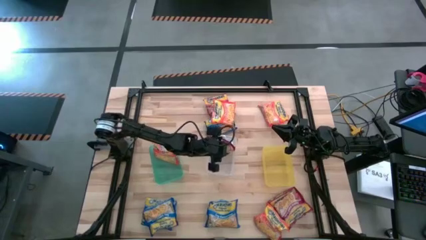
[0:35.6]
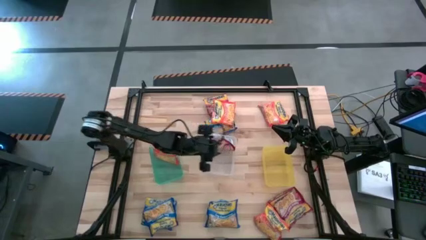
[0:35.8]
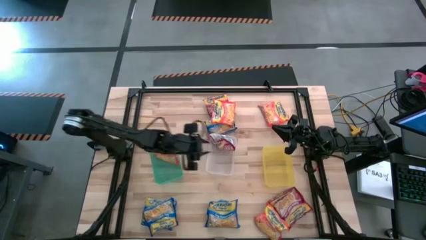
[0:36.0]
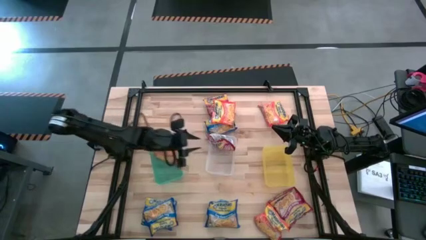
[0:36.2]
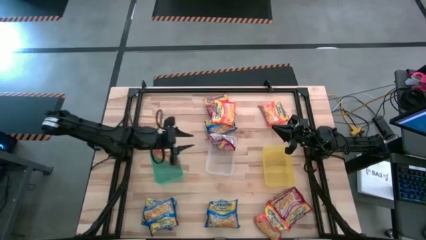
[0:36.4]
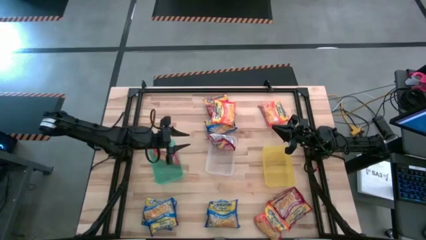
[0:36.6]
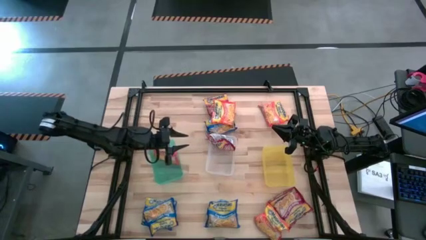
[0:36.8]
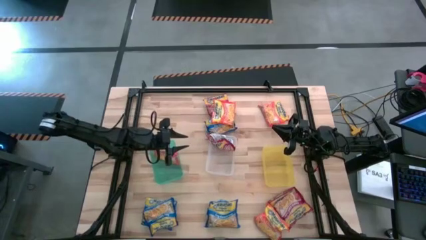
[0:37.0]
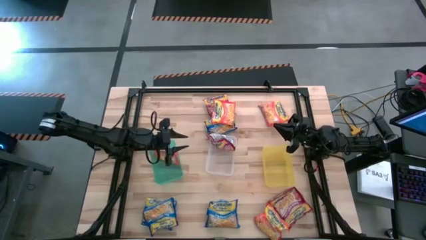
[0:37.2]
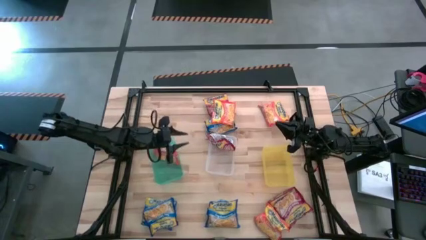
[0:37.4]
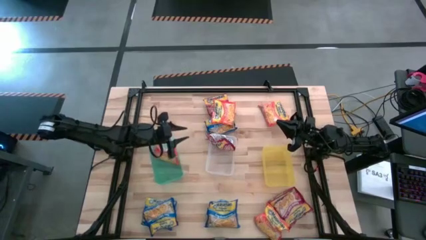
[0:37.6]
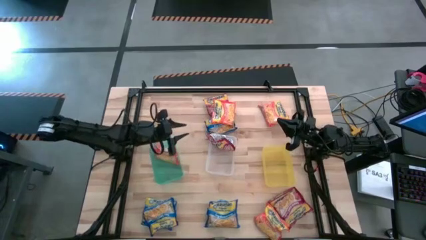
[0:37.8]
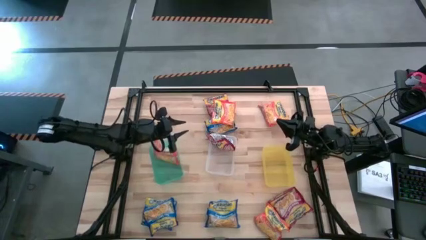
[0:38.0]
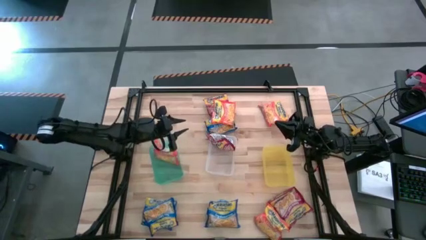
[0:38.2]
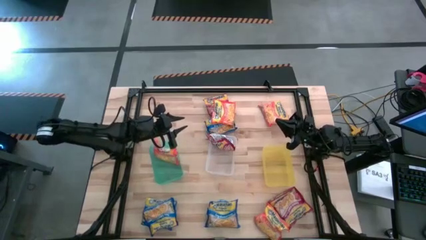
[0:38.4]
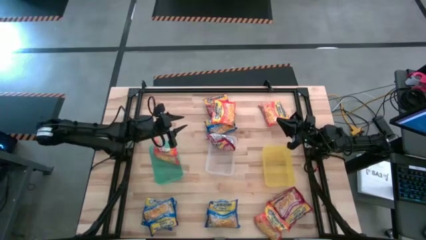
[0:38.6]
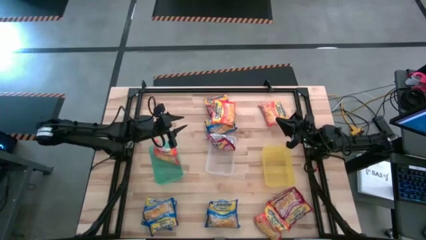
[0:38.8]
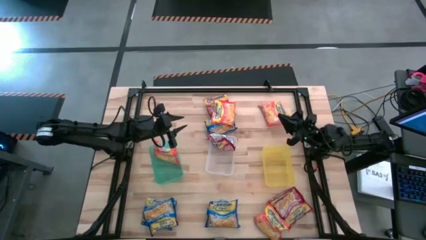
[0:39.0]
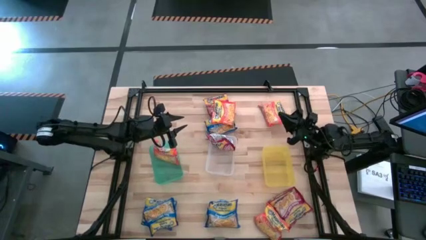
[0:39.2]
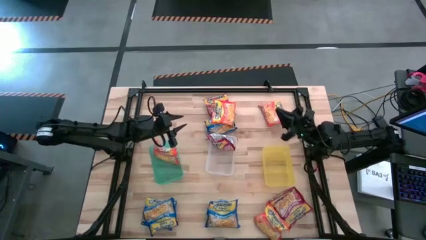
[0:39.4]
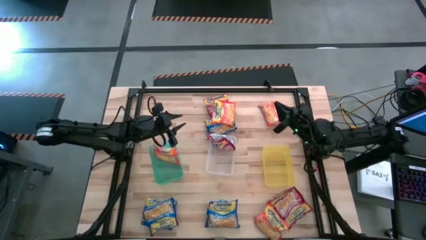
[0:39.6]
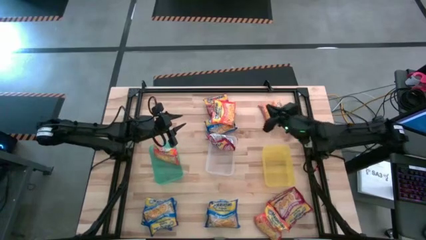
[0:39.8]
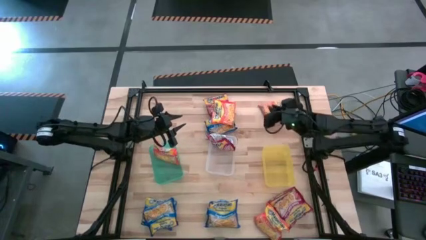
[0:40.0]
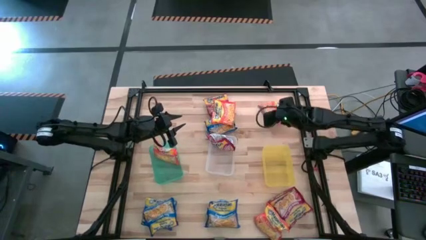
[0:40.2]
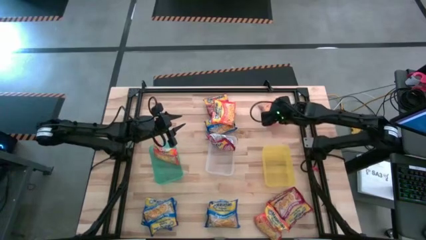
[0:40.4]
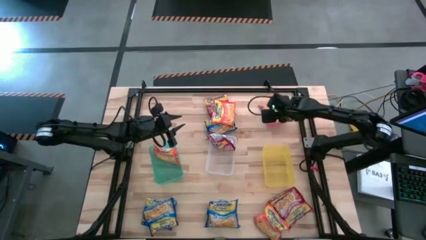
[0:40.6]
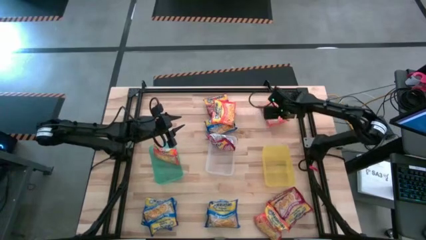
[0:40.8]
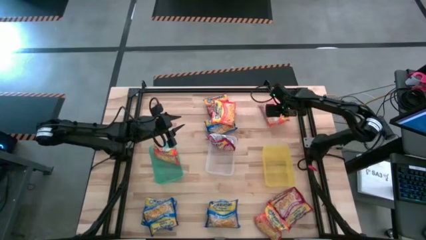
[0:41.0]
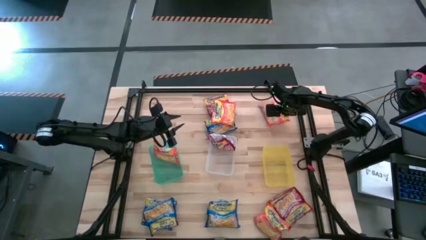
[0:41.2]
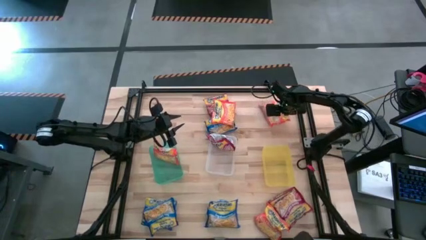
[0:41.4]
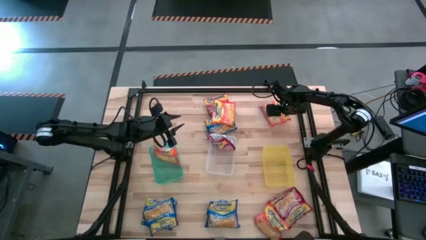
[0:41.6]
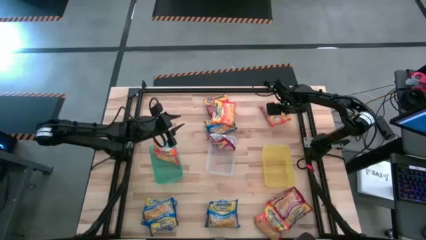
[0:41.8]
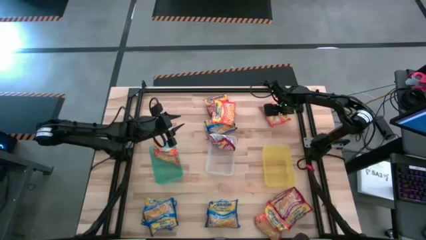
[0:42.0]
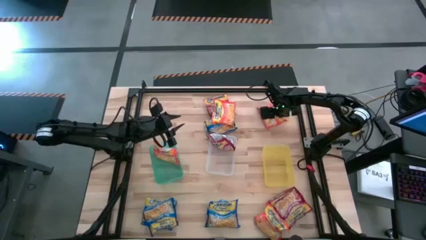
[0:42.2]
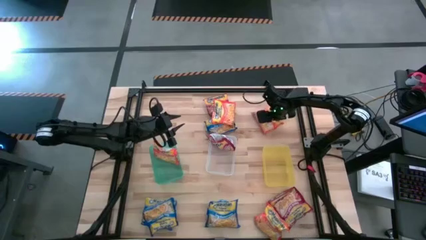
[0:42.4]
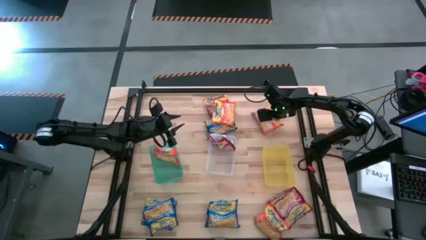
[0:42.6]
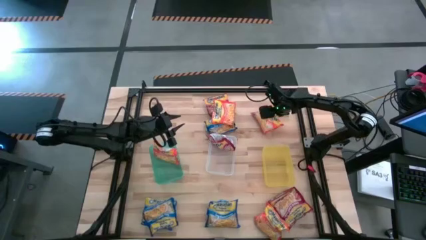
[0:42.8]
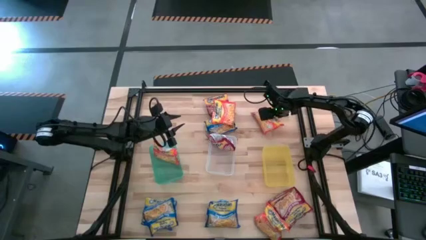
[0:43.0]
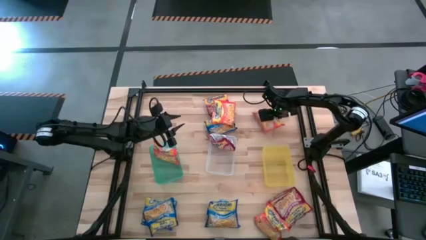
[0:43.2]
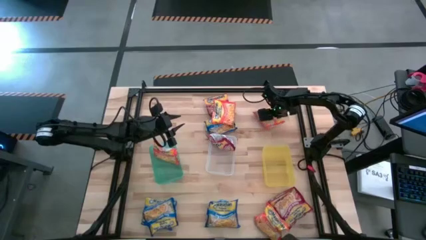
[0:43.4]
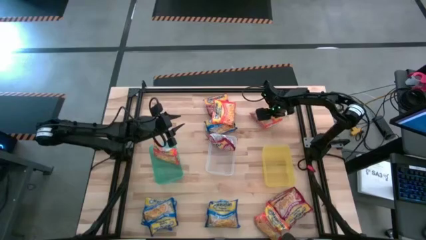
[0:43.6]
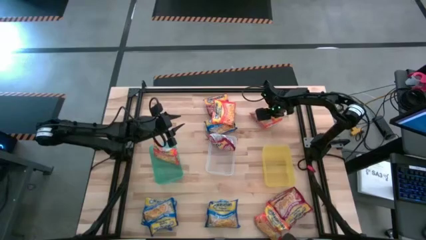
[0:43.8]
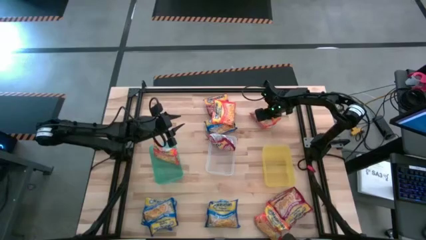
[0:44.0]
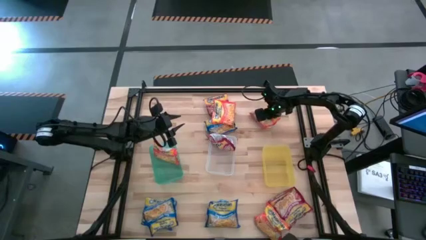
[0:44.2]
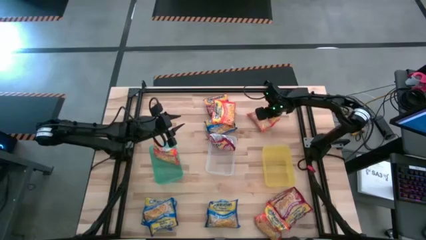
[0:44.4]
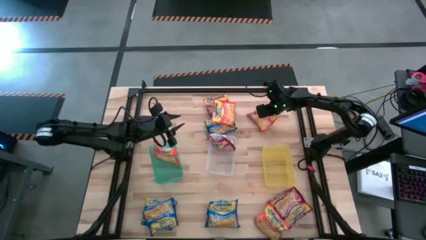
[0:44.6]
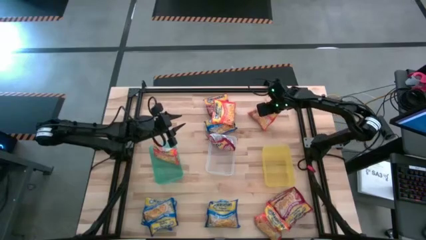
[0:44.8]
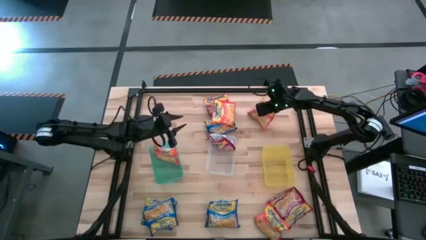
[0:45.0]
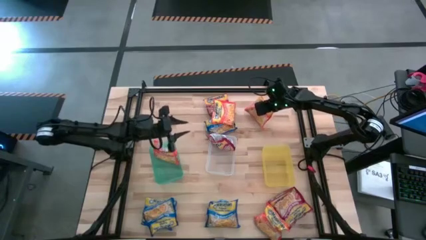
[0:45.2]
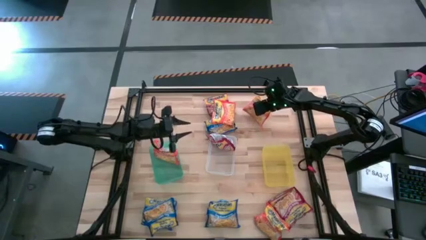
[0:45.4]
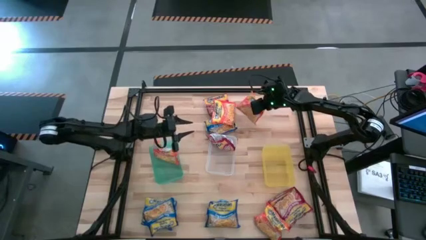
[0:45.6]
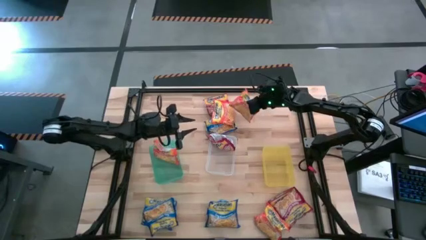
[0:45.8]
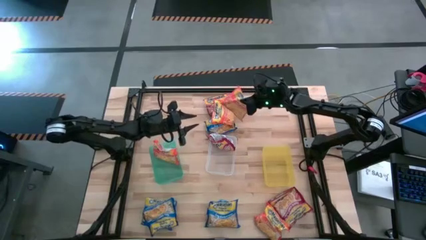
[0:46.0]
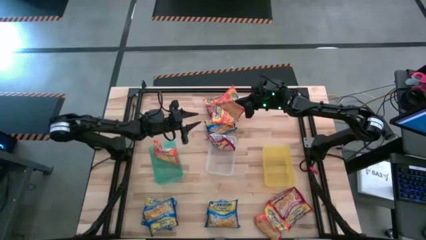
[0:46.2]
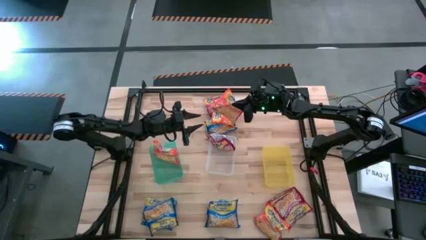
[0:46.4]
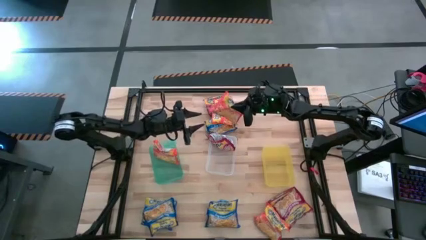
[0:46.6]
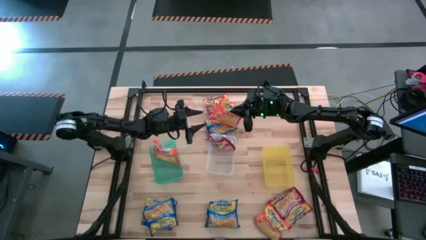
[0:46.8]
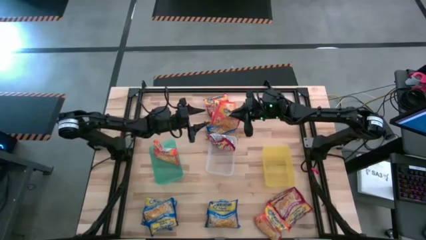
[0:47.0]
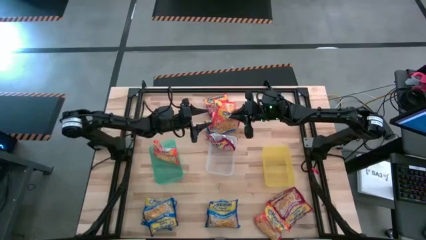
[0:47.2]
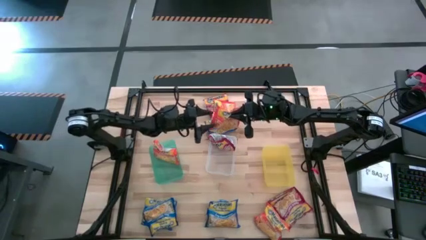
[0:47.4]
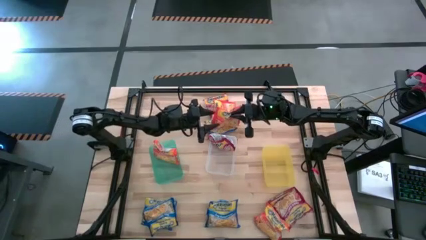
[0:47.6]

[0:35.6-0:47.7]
Task: Sort Maruchan noodles
Put the orange noodle pack into the green bin

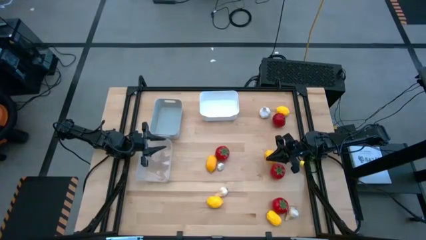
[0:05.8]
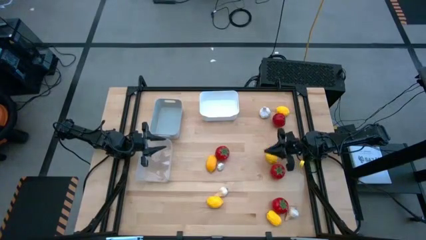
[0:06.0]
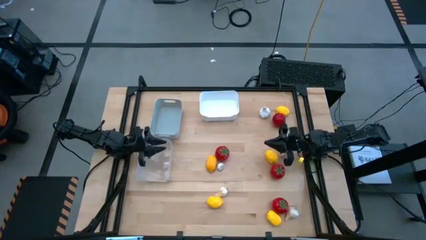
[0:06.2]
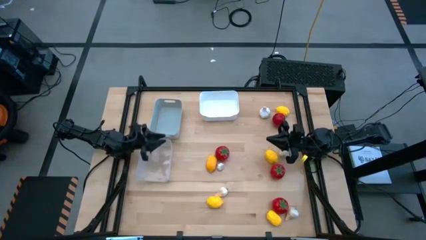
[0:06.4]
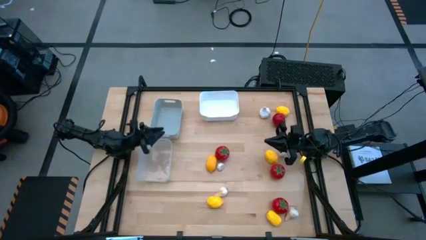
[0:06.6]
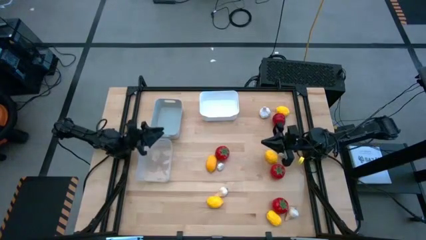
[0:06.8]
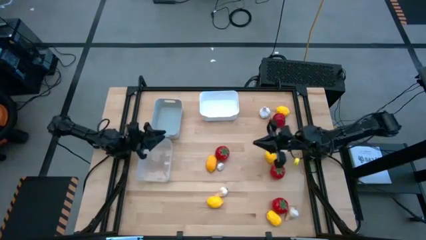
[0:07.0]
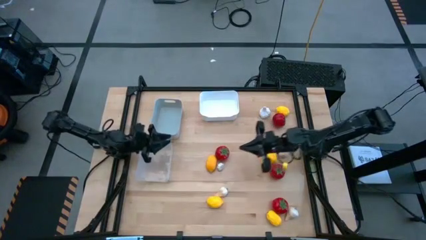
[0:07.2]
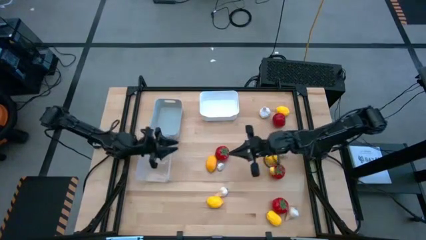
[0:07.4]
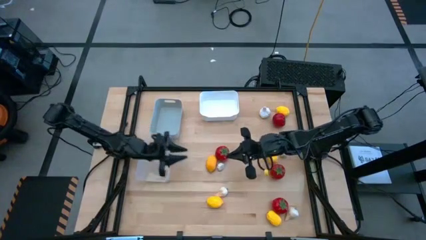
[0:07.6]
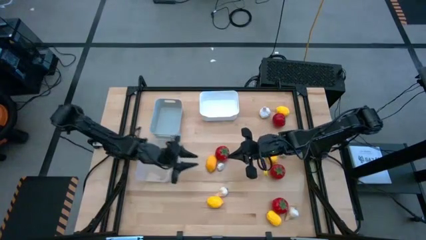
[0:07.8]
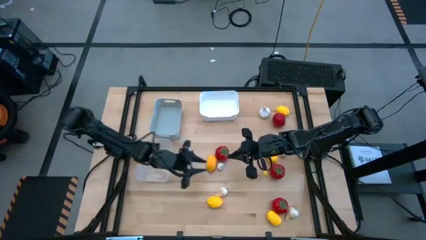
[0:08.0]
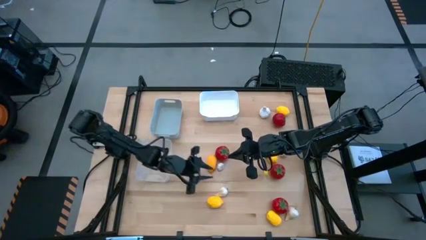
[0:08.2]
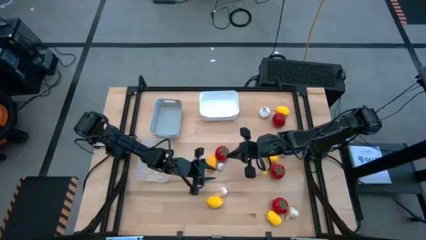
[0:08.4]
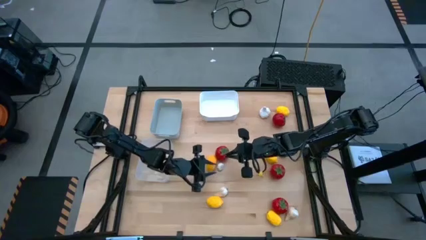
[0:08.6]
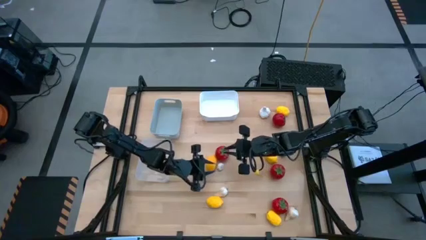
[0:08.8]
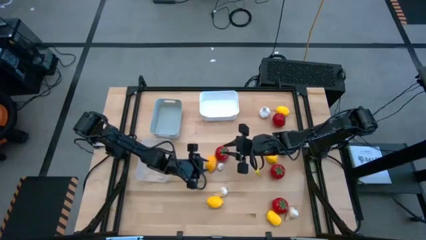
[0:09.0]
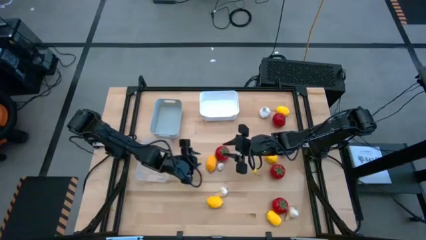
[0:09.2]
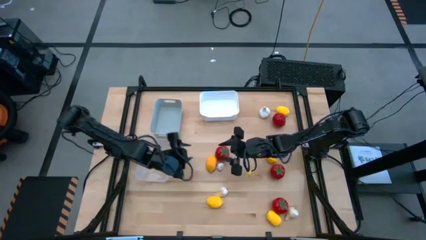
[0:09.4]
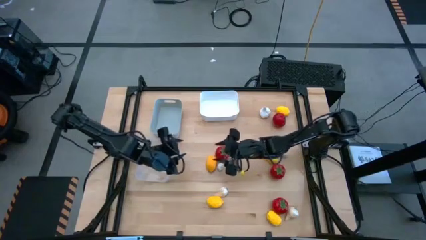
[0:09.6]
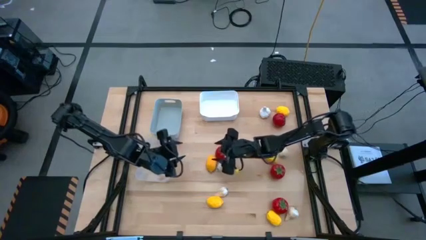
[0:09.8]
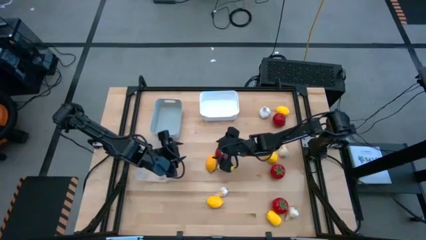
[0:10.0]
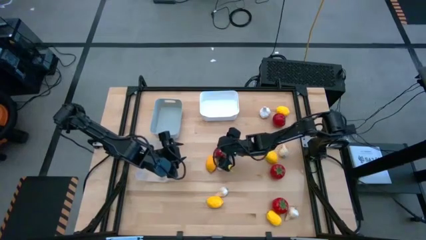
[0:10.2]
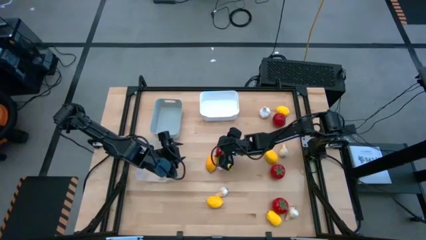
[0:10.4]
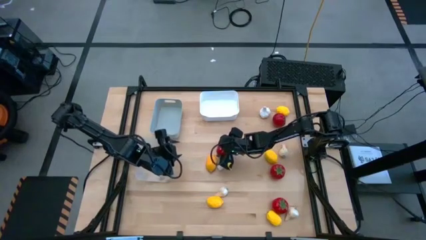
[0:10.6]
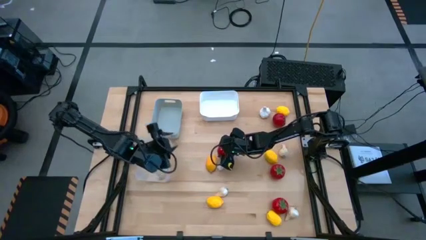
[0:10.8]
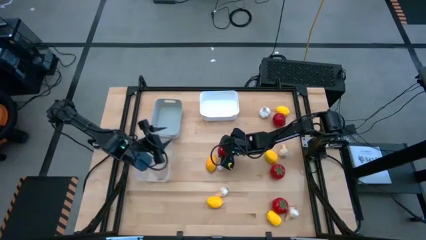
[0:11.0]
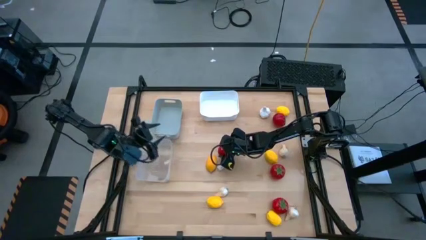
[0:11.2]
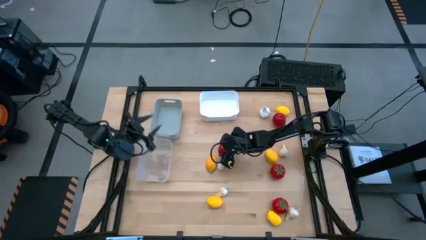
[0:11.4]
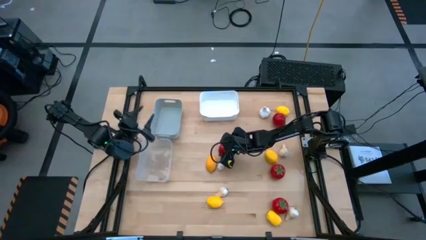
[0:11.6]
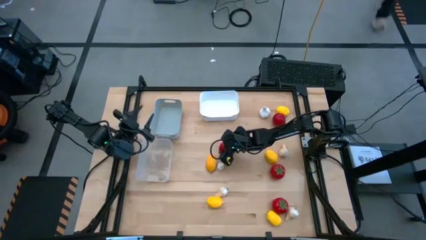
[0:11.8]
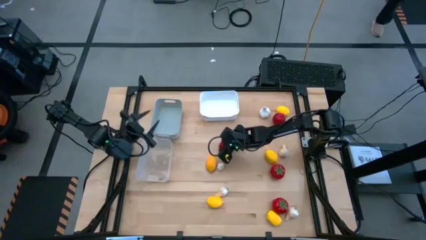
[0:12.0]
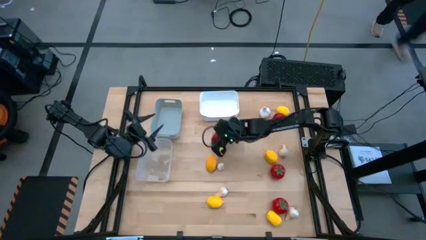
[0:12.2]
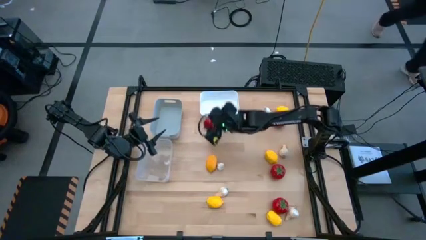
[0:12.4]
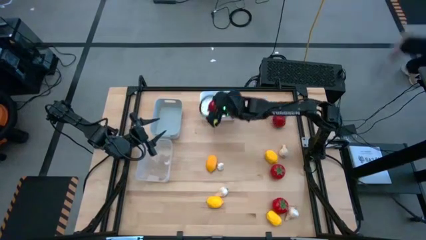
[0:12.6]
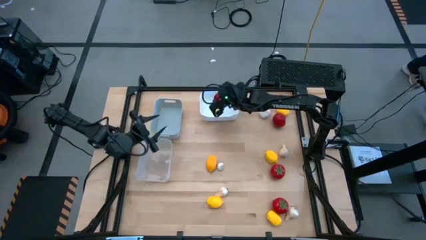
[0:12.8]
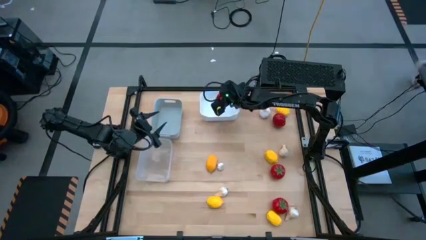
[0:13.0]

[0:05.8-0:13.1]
Task: Sort produce into baskets
Put the red tomato into the white bin
